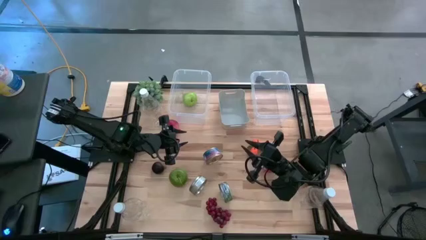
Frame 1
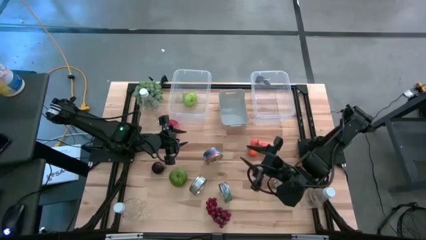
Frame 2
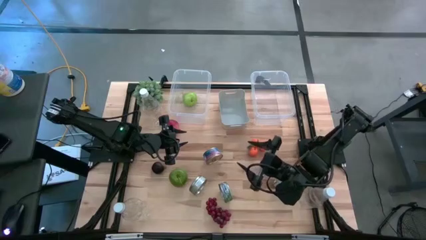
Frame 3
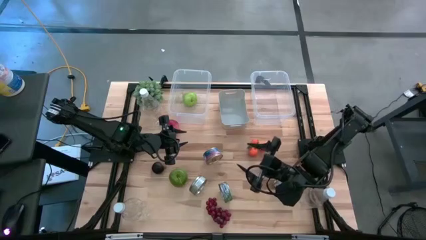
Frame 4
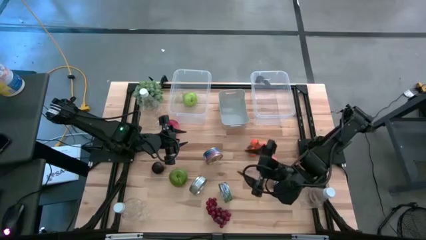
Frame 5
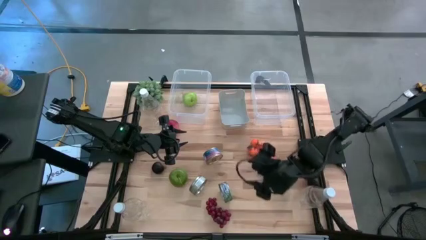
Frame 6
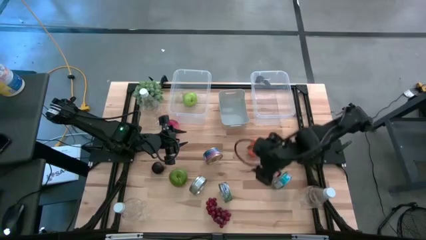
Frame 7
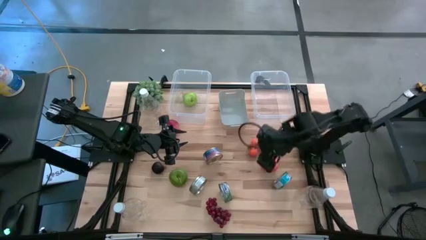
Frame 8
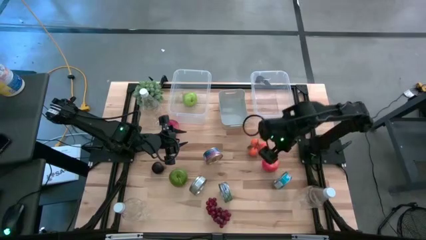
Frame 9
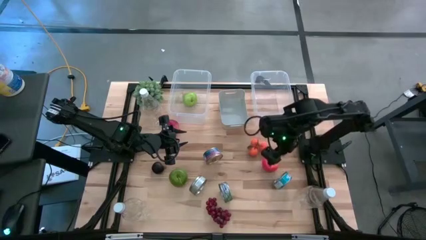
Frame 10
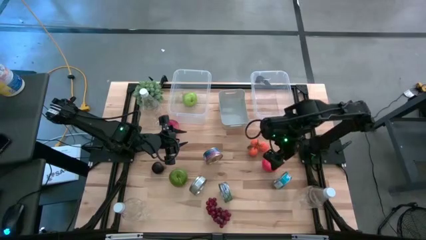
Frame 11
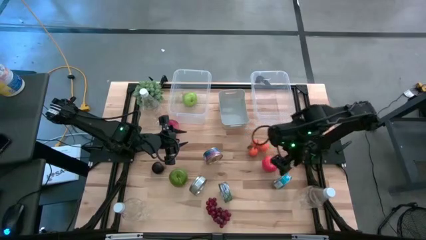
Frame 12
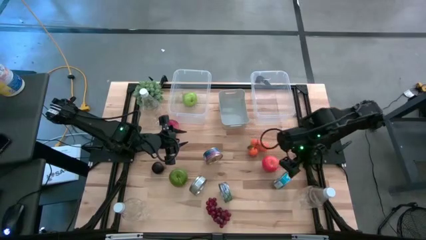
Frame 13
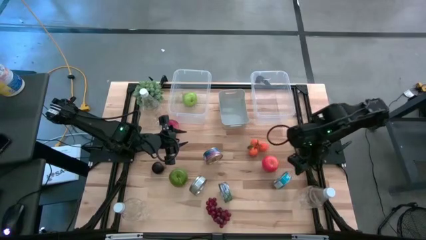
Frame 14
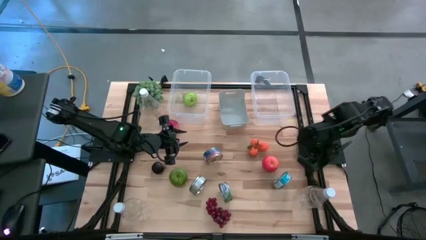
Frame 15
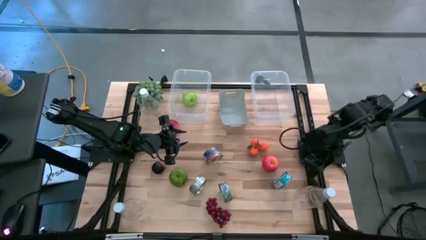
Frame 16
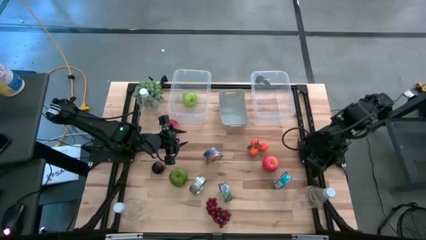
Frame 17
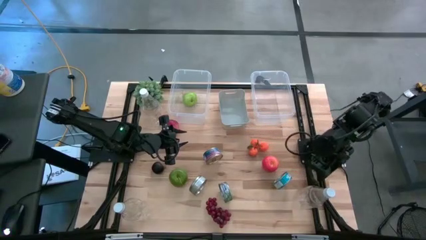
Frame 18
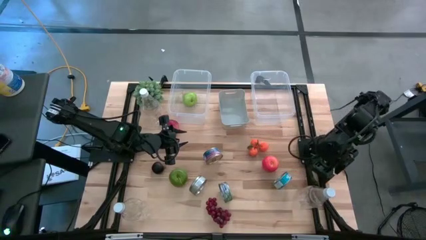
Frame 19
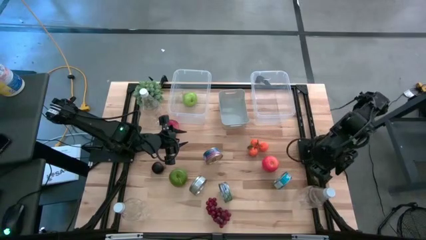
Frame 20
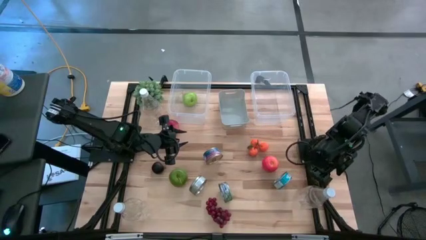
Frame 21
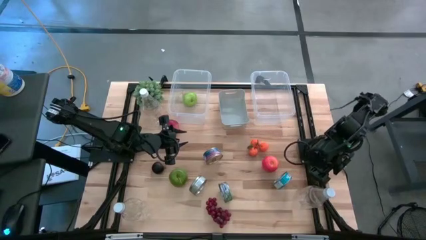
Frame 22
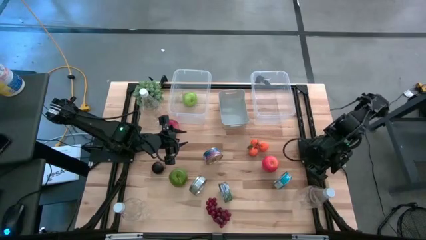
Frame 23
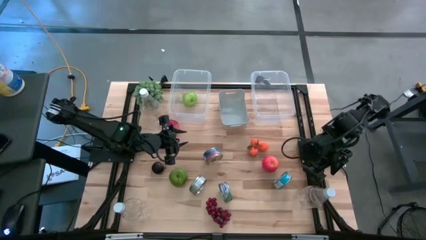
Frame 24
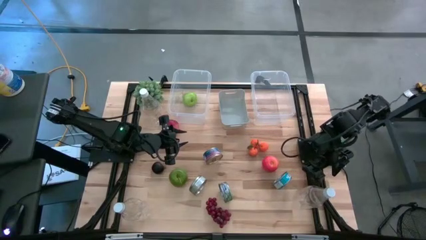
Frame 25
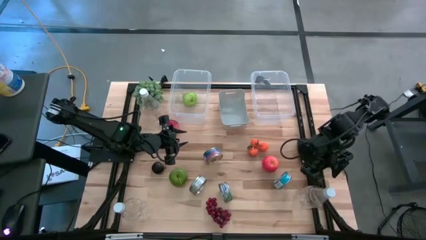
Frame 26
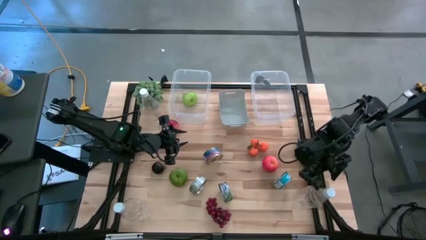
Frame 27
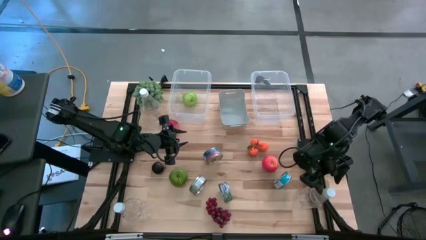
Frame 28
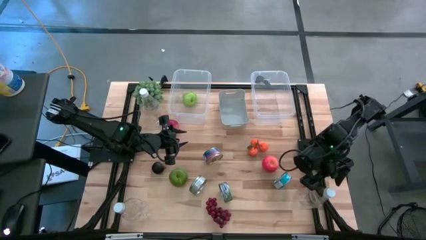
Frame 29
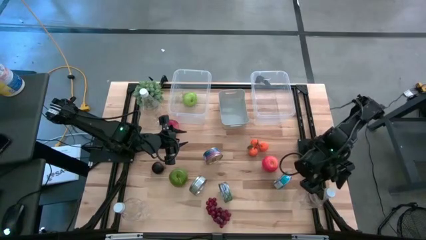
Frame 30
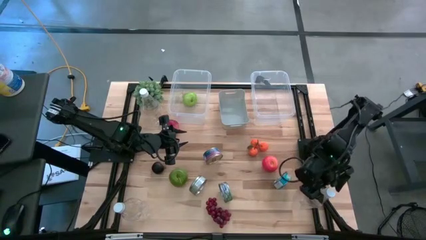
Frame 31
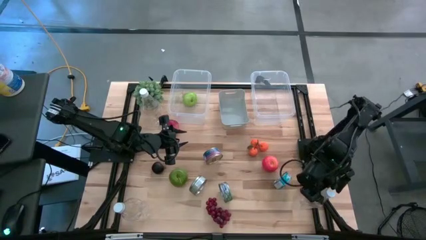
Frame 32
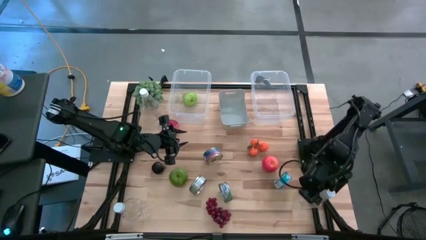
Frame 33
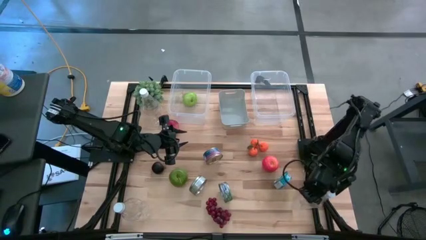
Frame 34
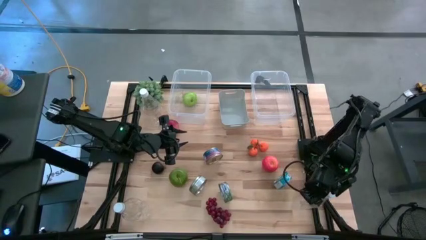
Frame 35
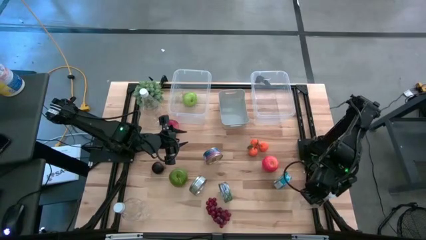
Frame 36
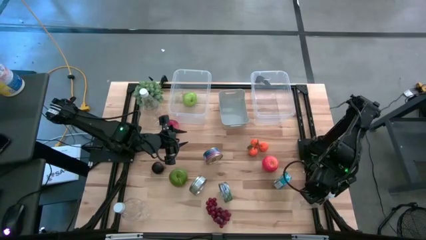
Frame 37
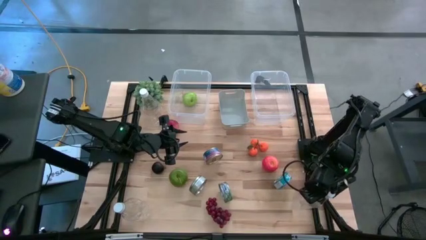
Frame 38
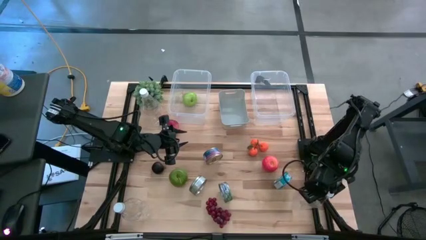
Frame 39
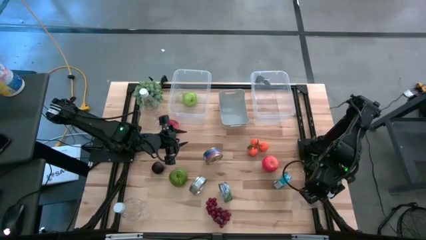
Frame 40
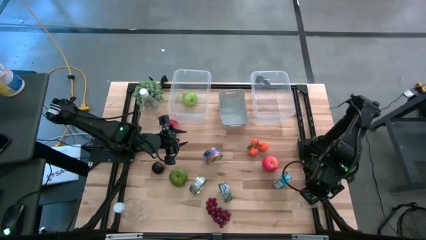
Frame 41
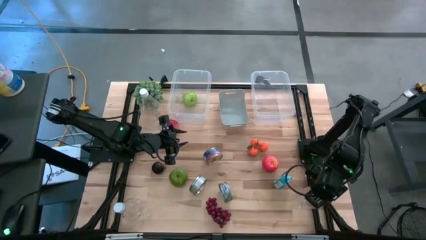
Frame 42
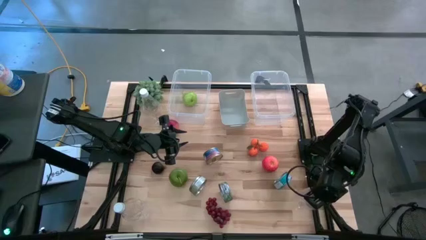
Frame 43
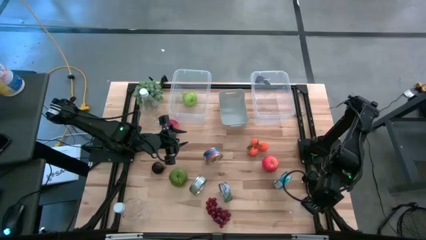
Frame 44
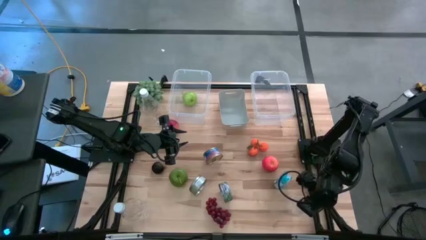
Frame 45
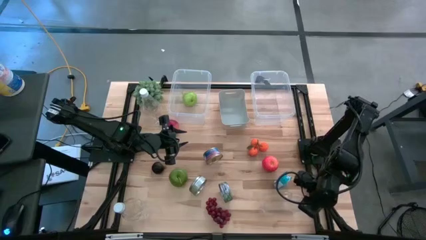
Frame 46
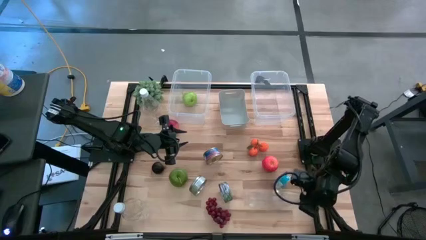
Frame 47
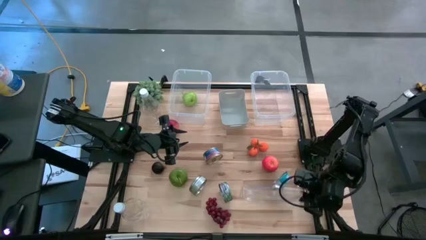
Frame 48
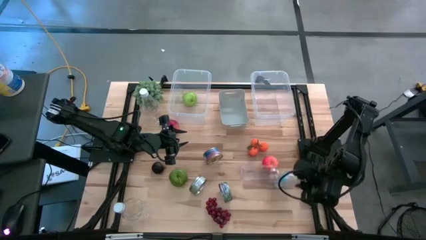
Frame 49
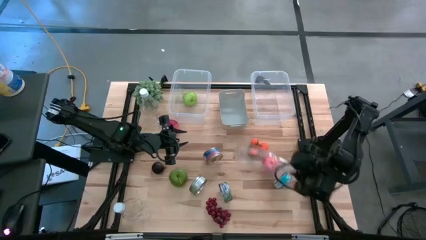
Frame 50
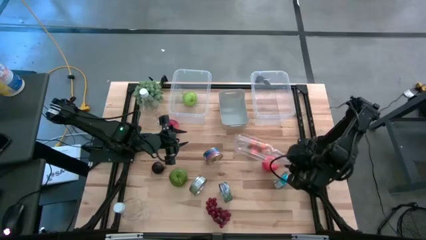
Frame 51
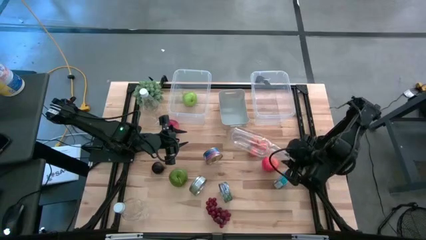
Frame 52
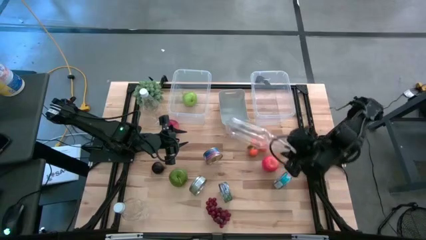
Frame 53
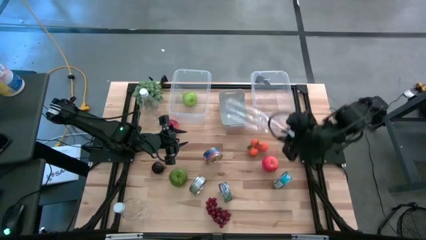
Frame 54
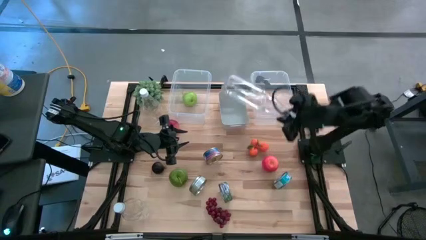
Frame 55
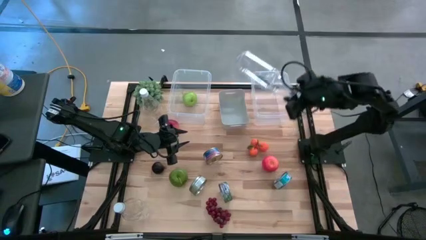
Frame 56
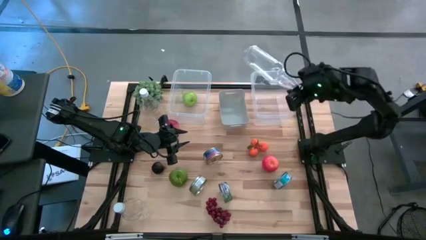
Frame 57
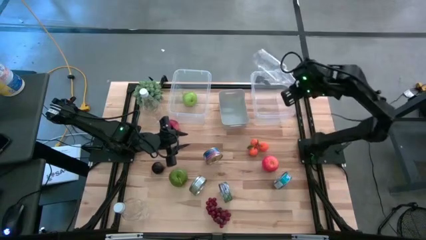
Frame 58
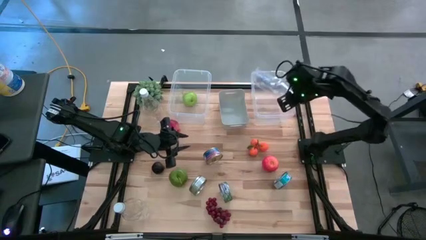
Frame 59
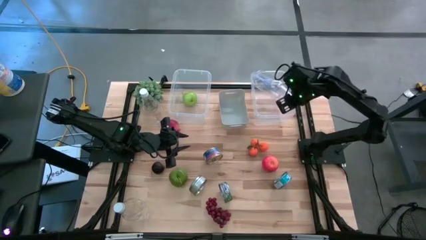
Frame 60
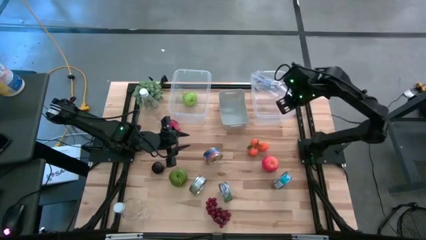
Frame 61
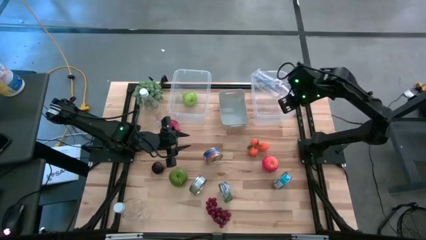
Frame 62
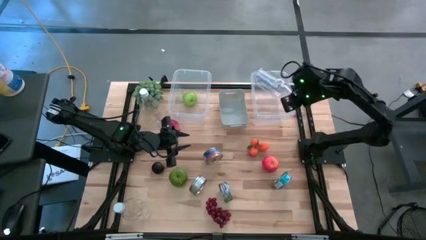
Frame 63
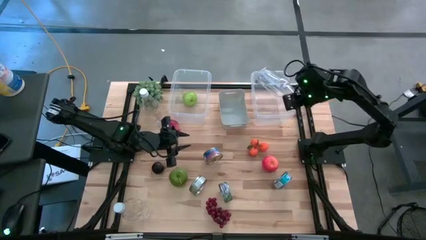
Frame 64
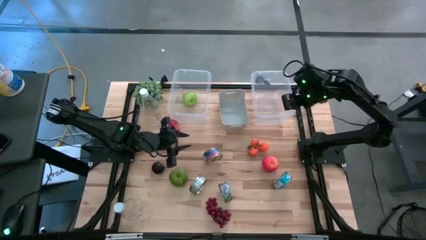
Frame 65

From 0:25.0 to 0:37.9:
Task: Pick & Place Food Item
Put the bottom right plastic bottle into the right transparent bin
